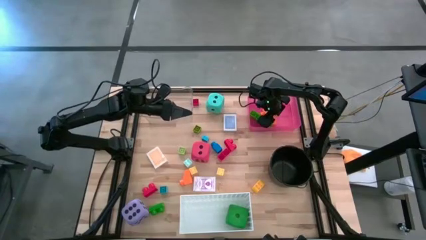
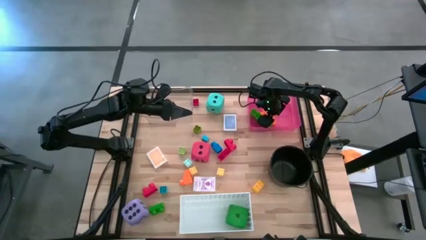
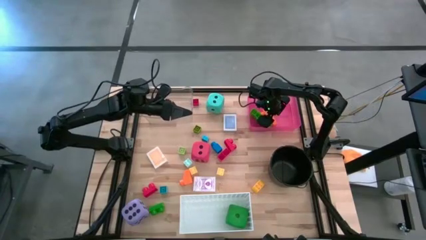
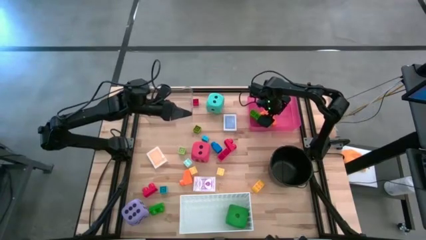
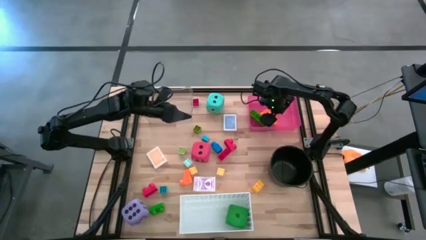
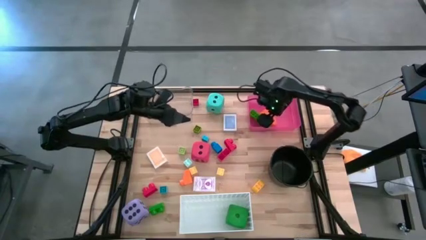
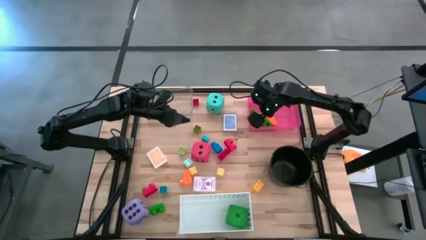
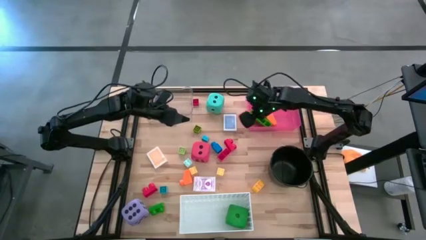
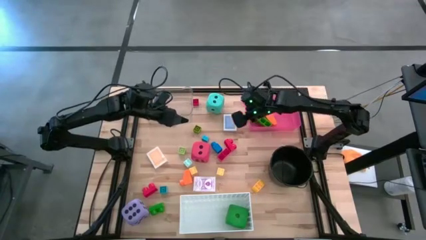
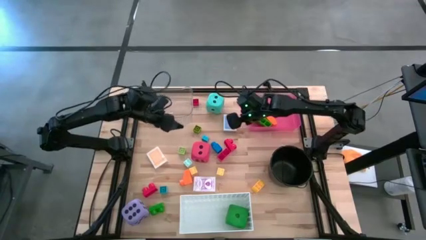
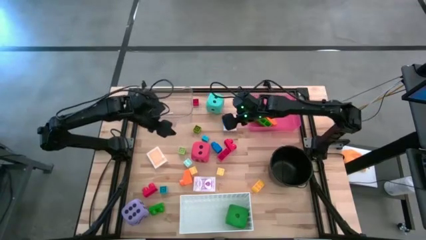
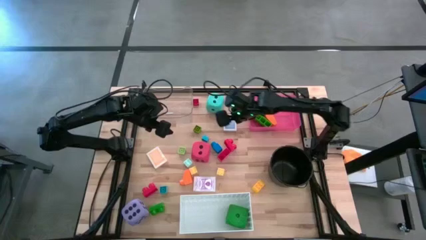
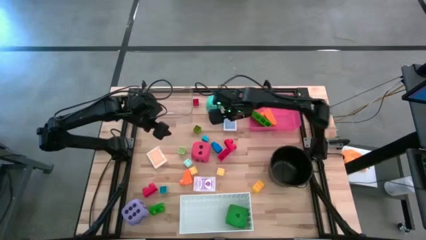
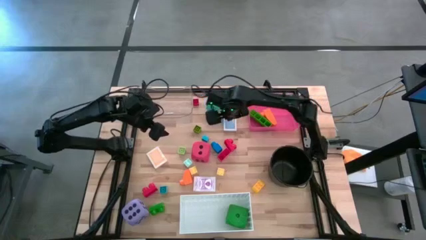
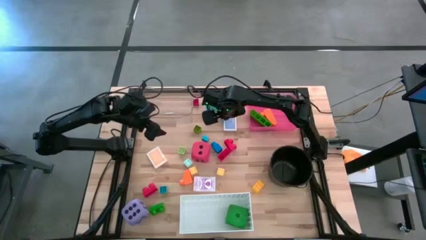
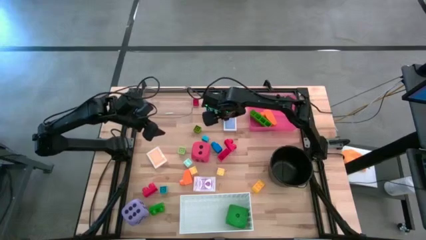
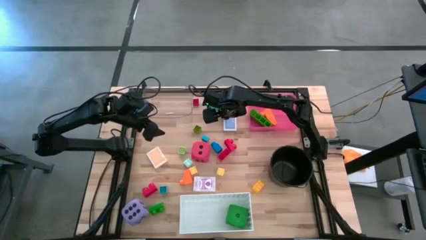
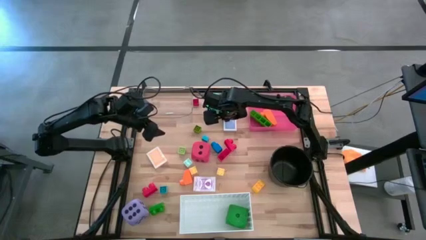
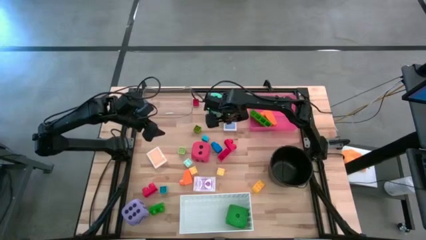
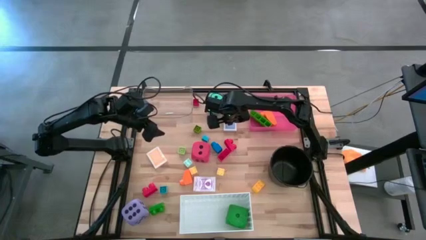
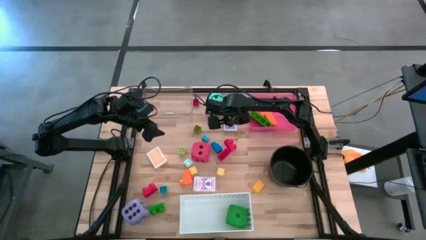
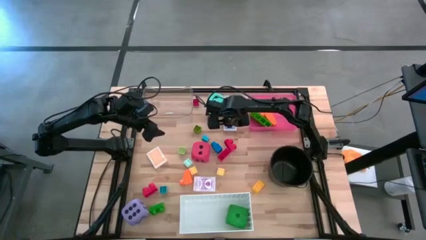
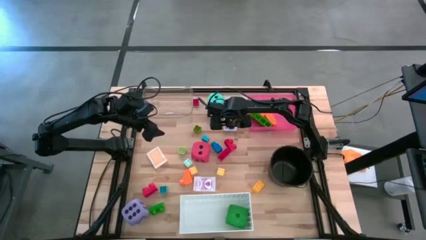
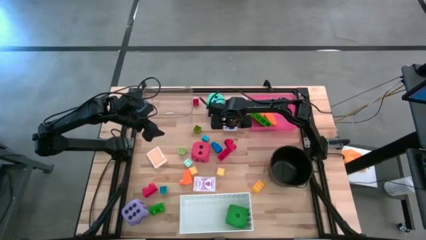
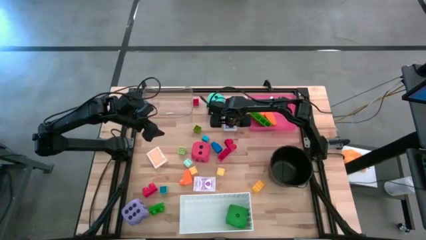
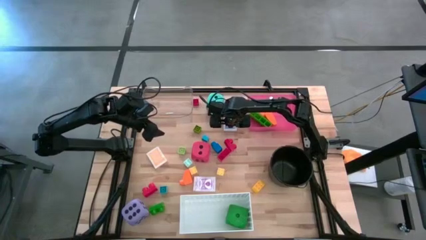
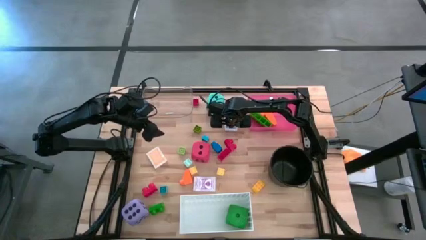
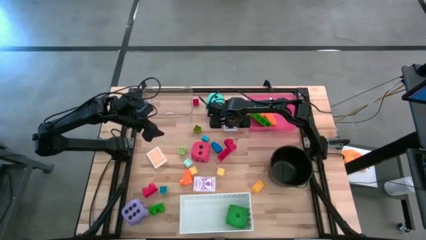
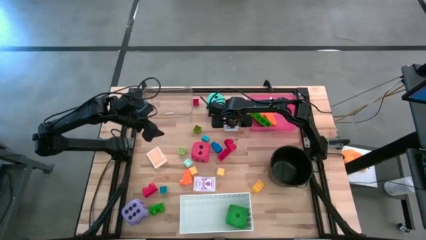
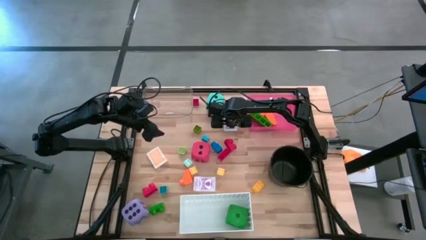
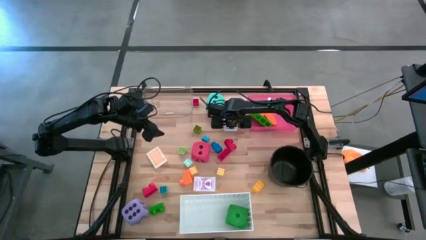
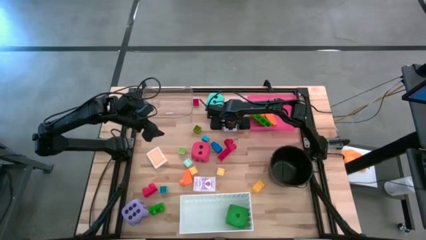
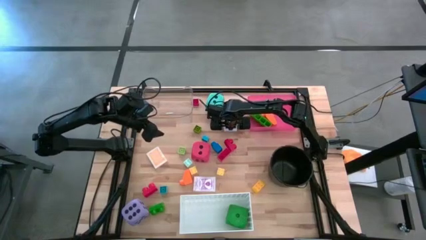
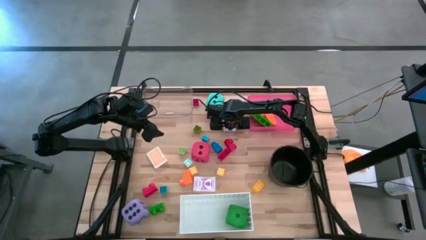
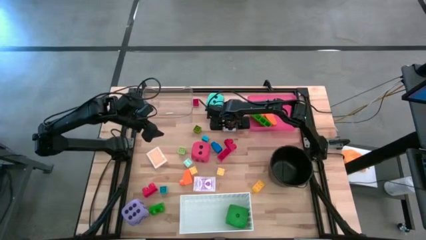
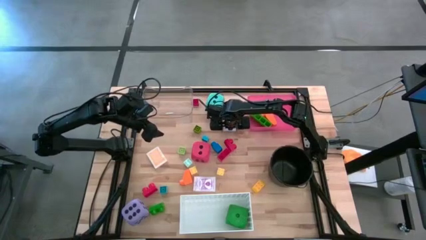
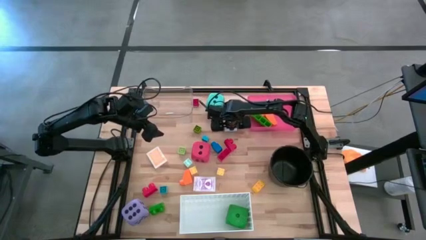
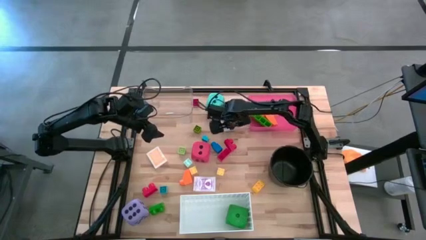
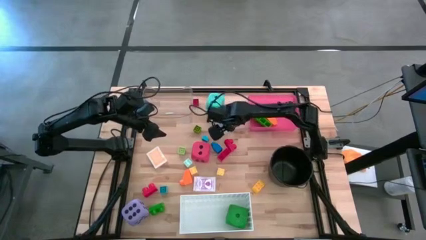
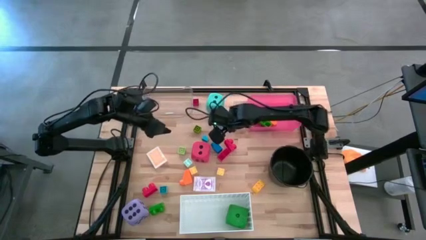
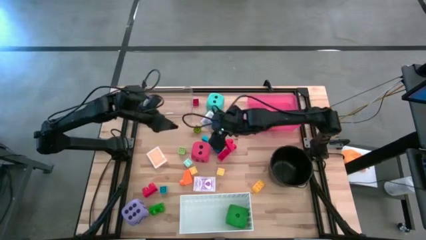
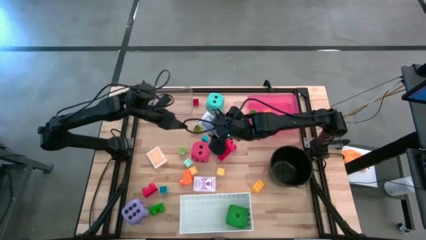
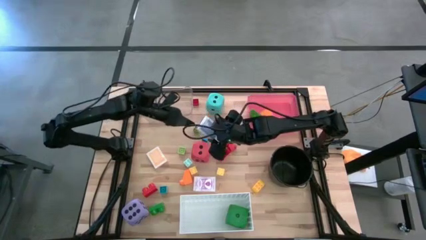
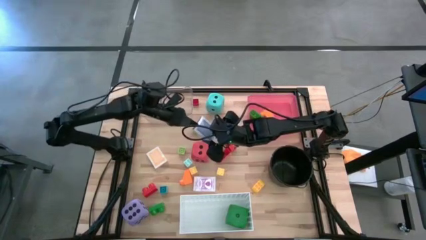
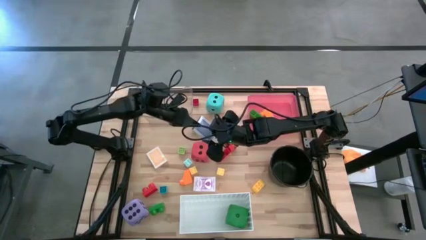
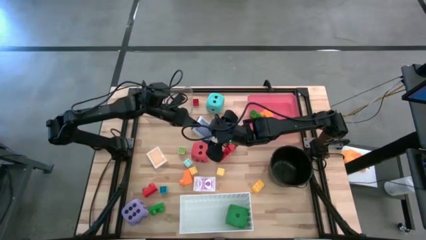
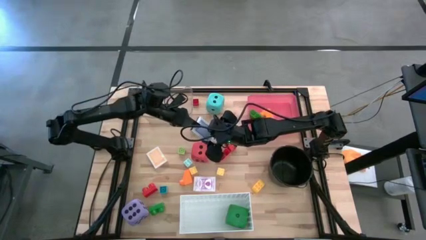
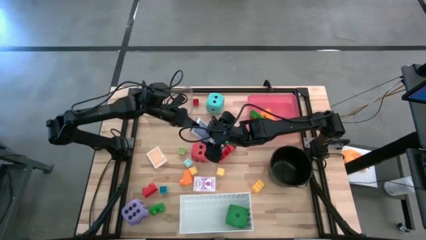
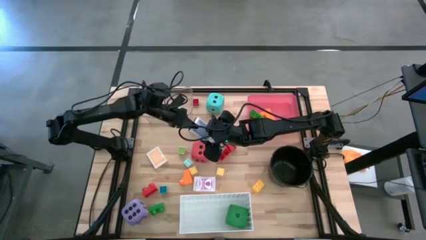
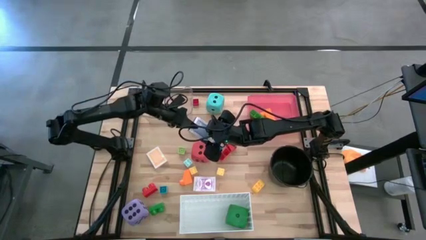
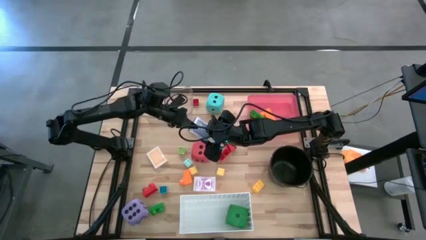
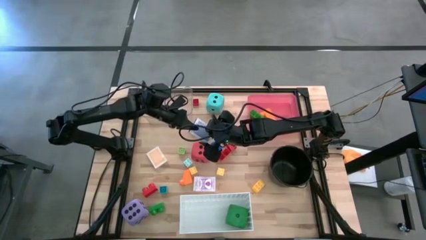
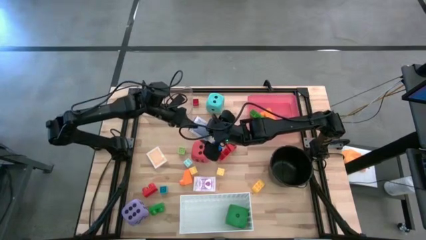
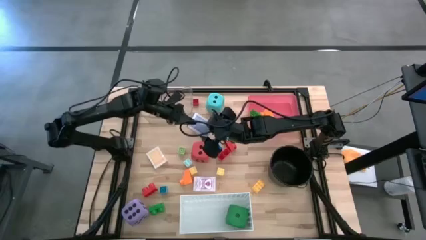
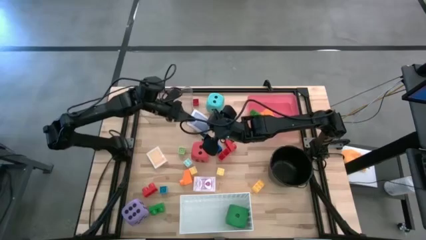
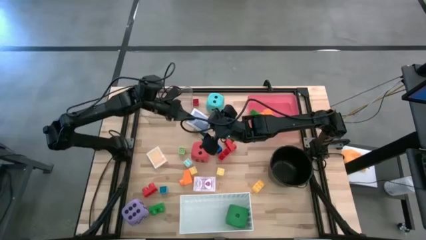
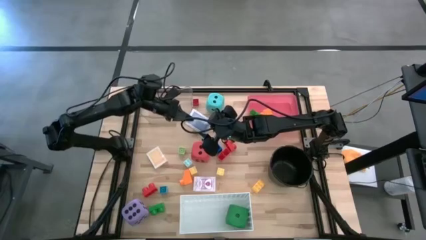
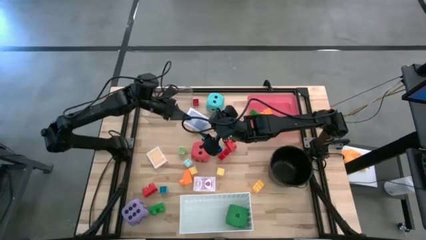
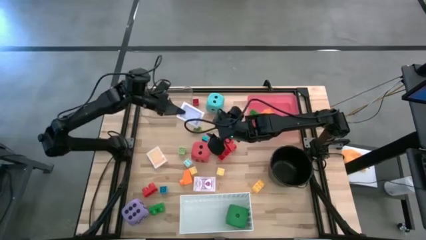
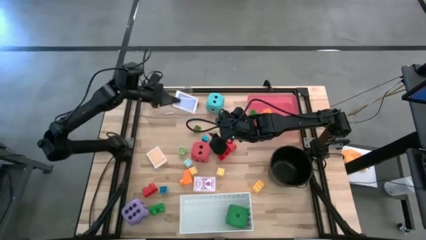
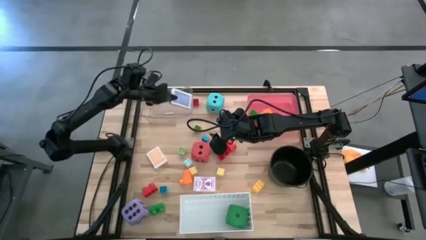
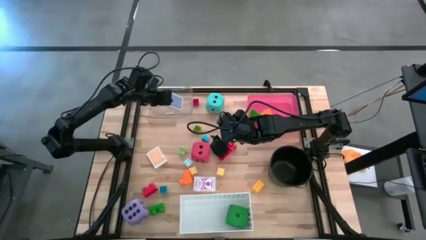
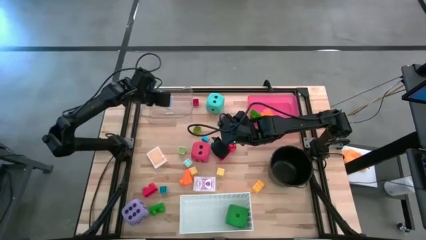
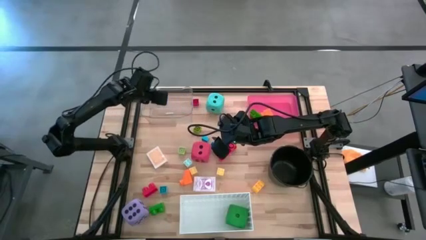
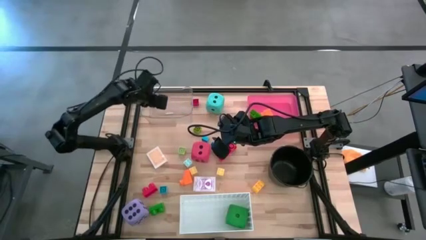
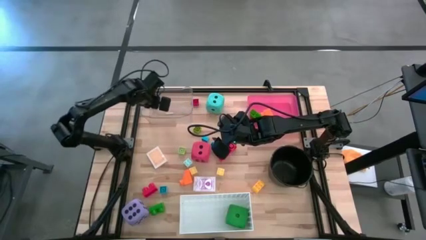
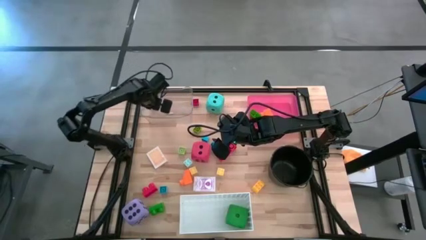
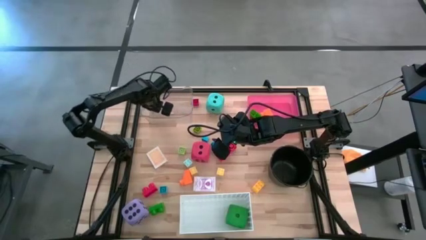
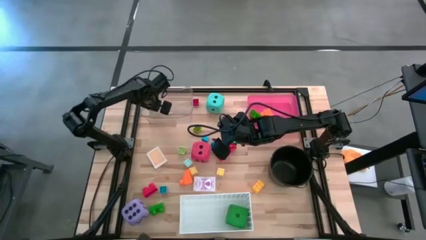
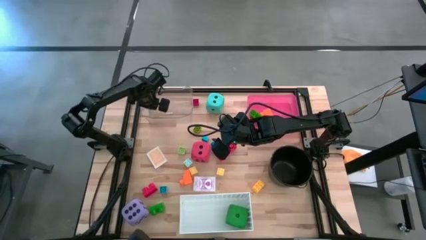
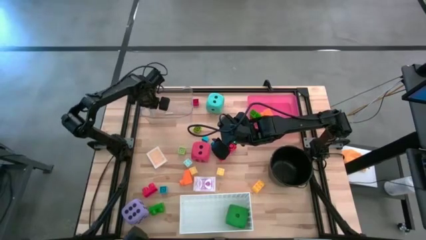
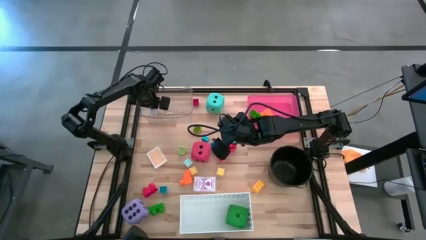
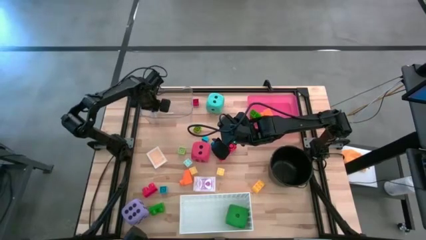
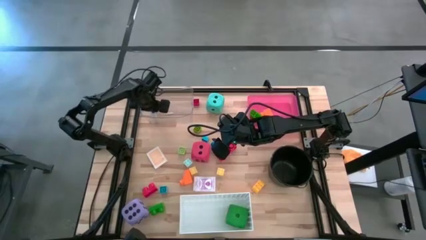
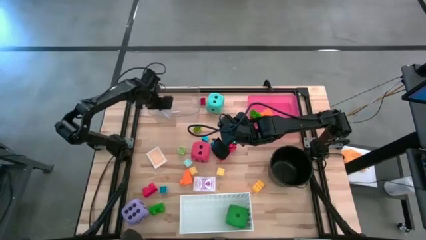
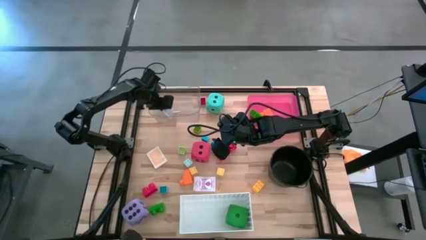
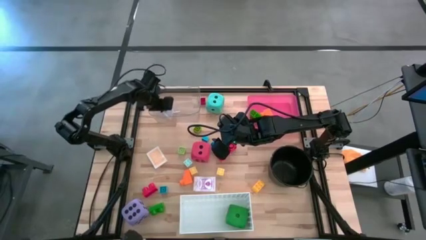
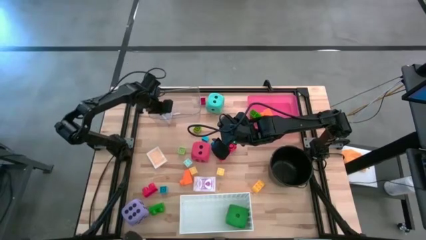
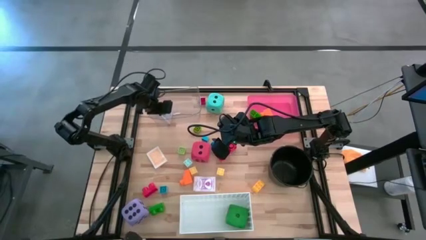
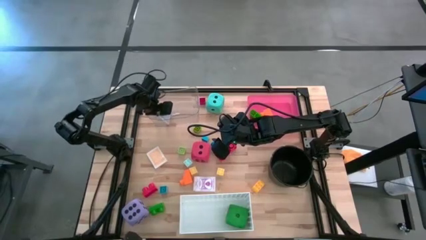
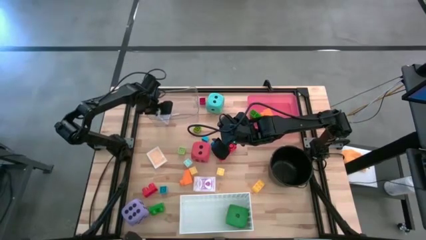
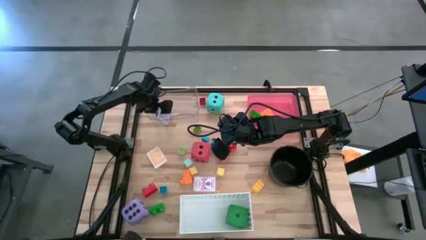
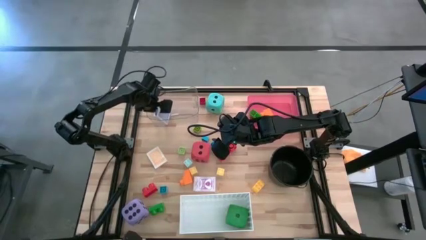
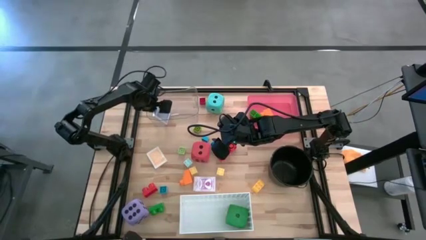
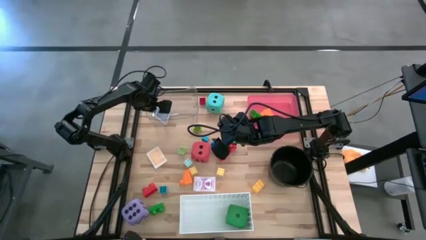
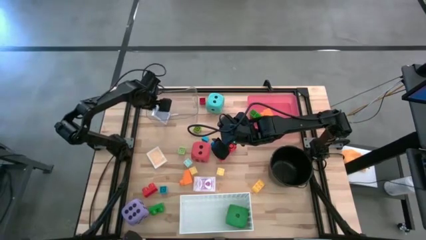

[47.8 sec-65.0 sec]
Task: Pick & Place Toys
Put the blue deck of cards into the transparent bin
